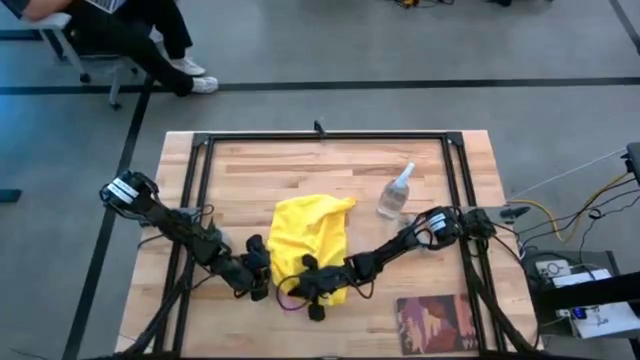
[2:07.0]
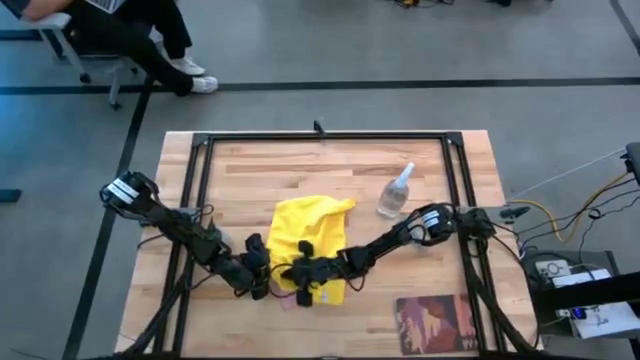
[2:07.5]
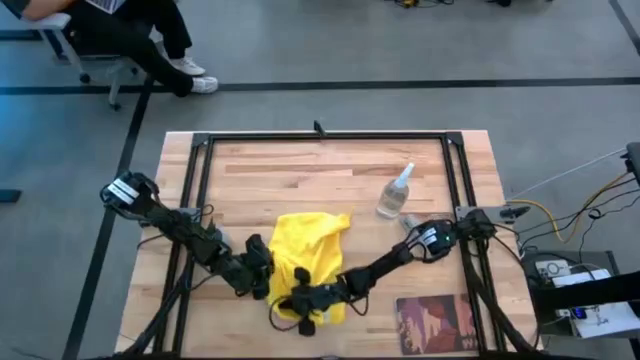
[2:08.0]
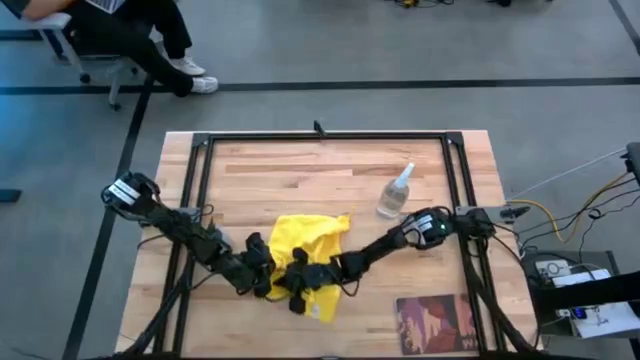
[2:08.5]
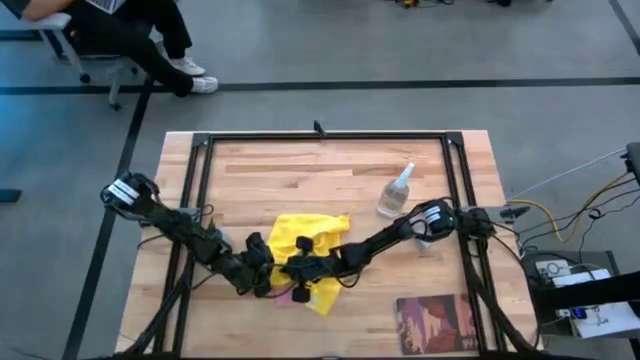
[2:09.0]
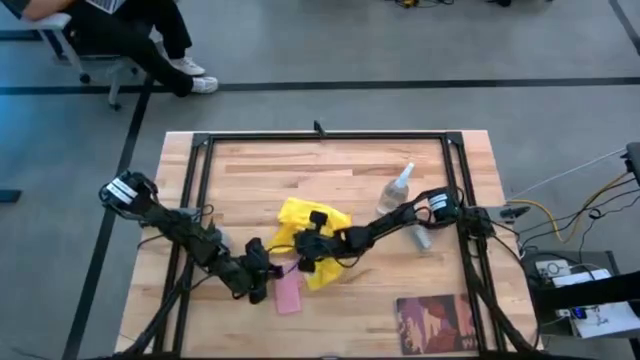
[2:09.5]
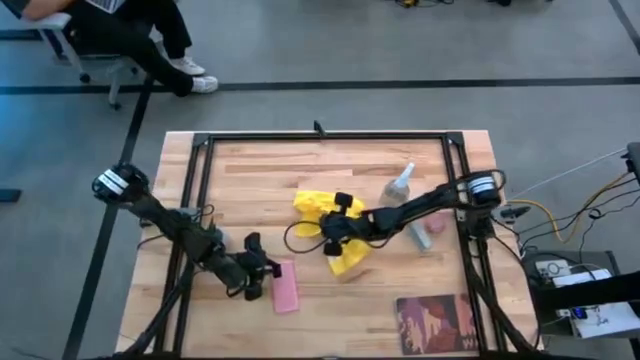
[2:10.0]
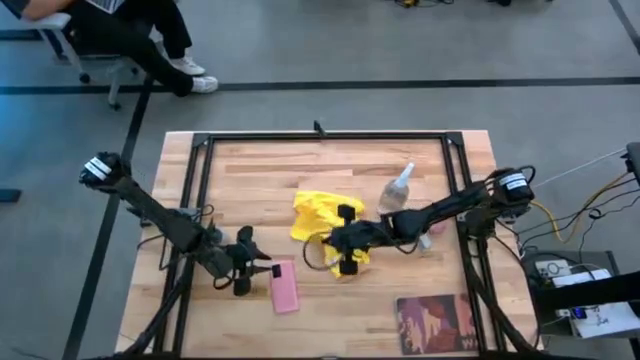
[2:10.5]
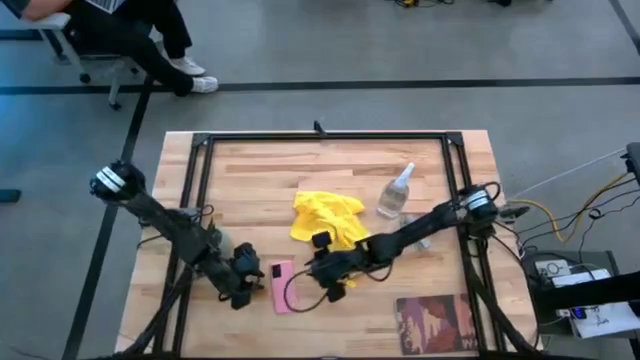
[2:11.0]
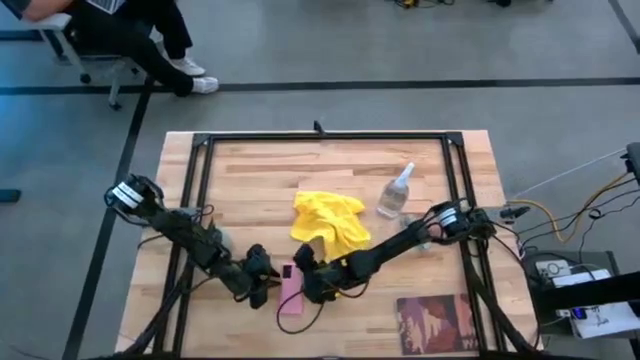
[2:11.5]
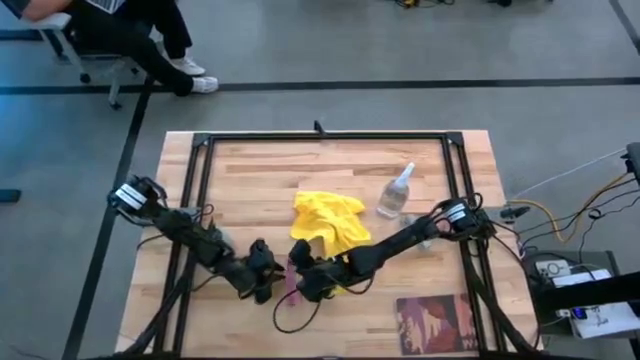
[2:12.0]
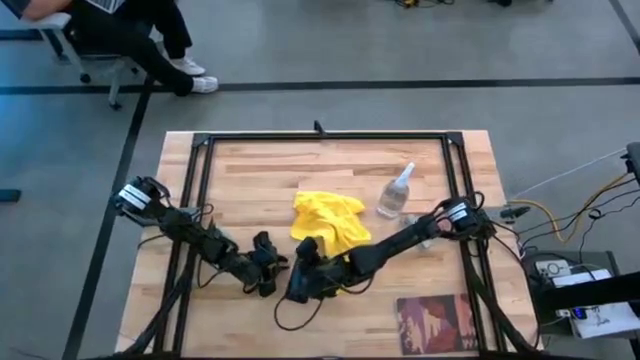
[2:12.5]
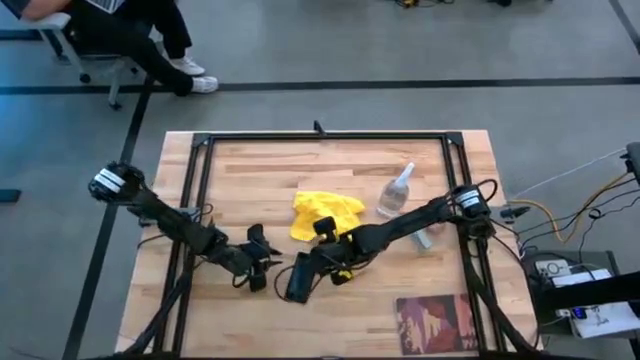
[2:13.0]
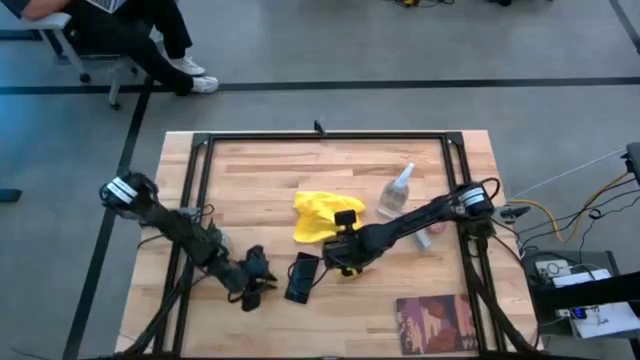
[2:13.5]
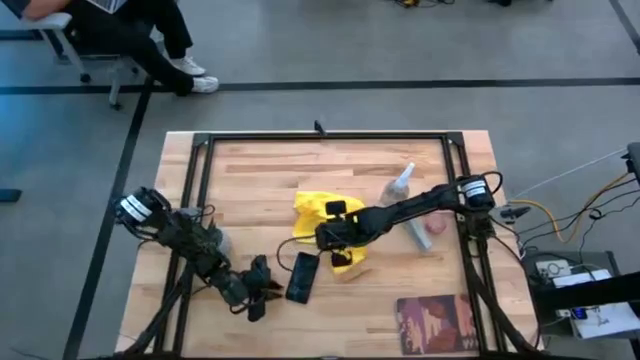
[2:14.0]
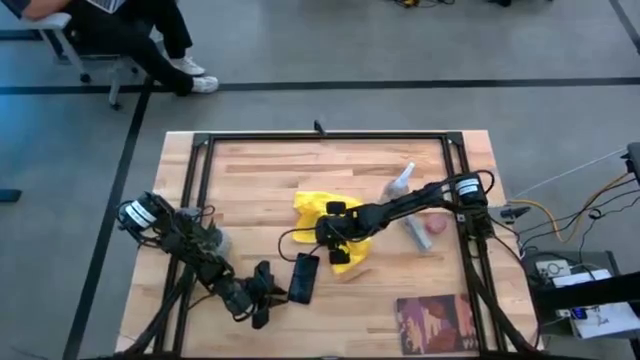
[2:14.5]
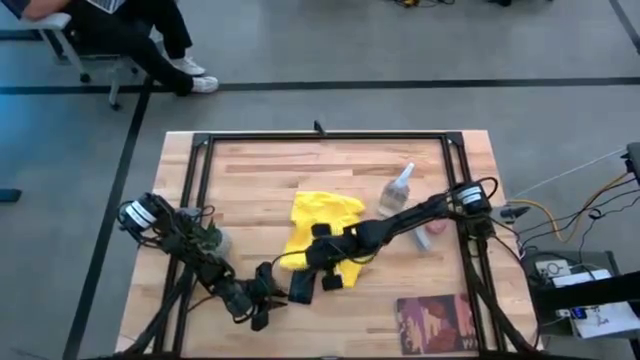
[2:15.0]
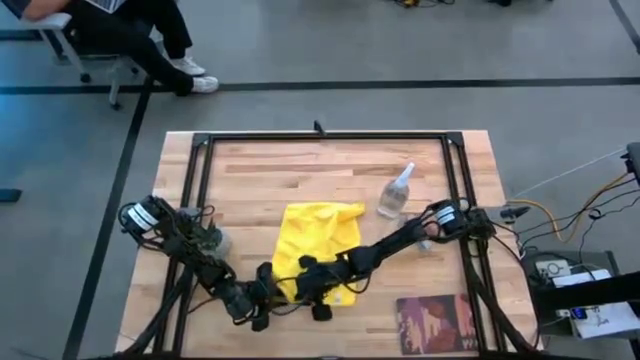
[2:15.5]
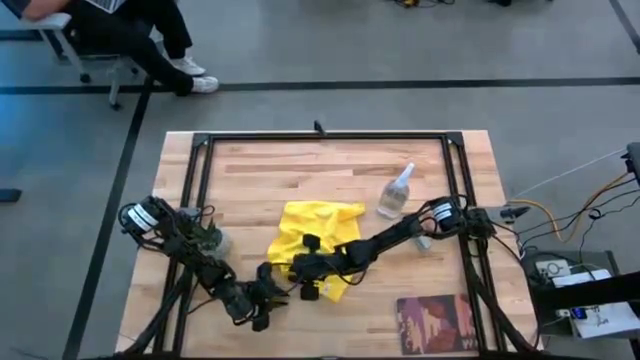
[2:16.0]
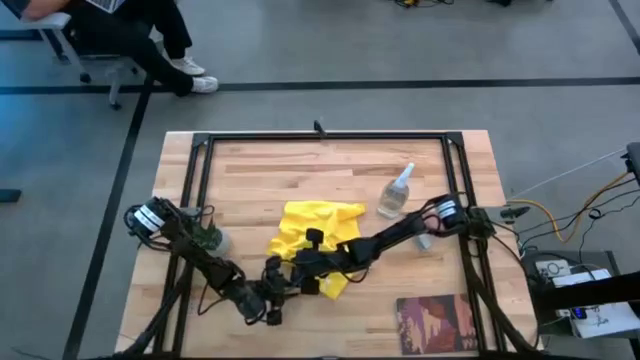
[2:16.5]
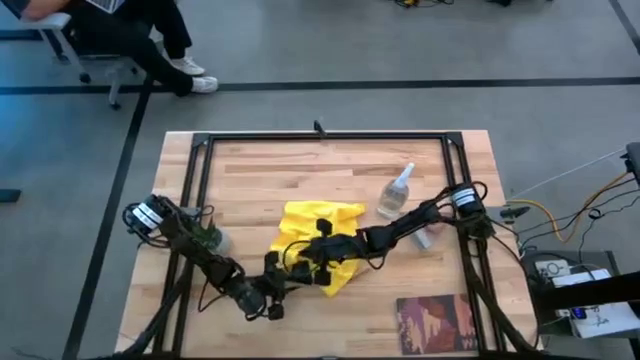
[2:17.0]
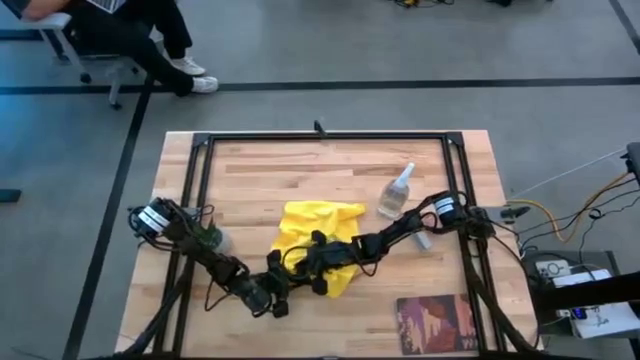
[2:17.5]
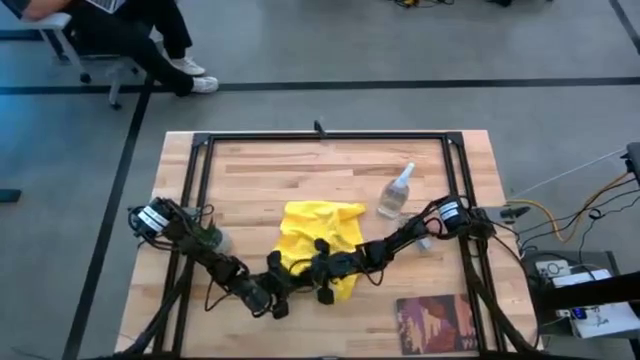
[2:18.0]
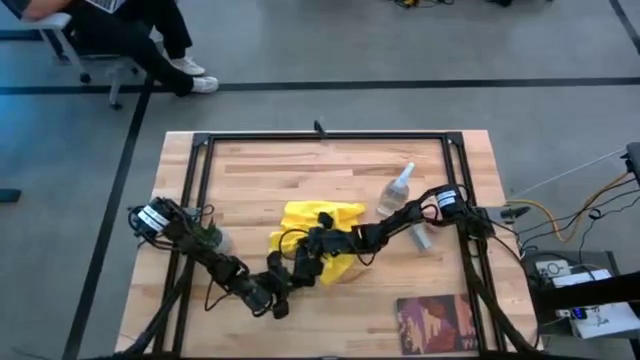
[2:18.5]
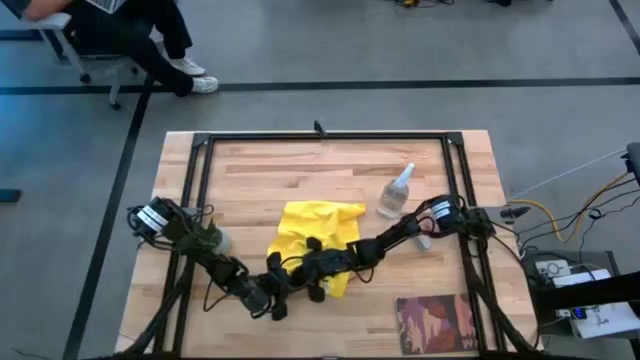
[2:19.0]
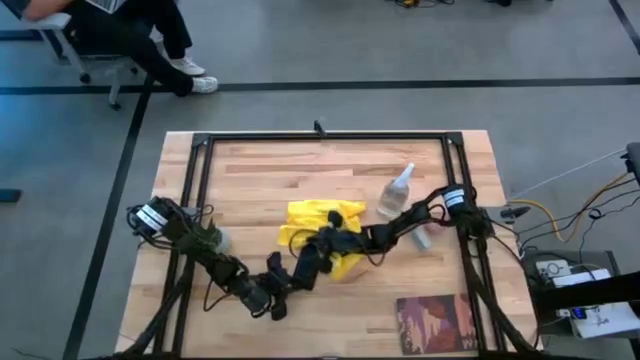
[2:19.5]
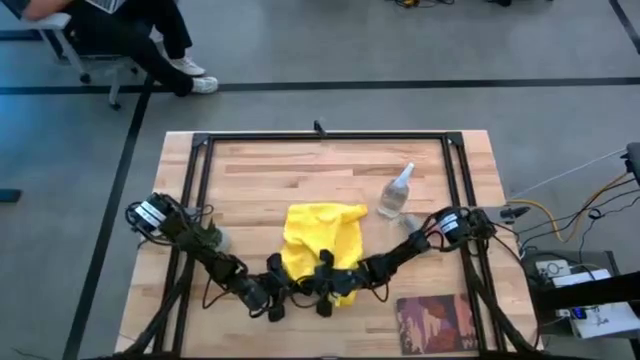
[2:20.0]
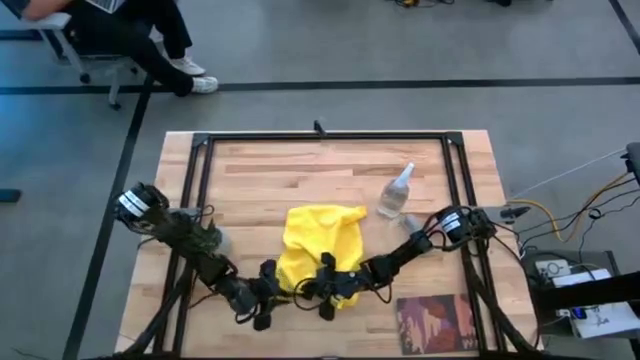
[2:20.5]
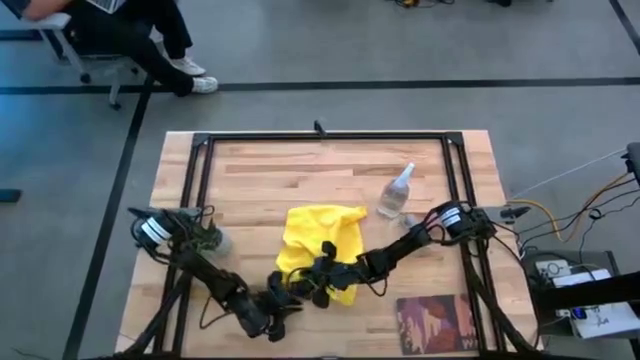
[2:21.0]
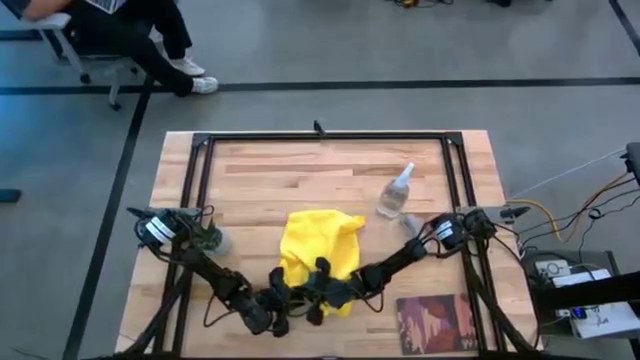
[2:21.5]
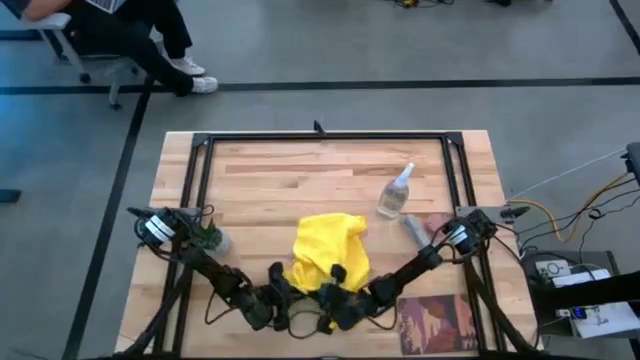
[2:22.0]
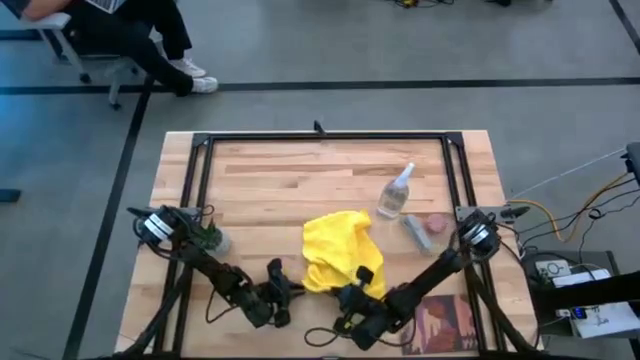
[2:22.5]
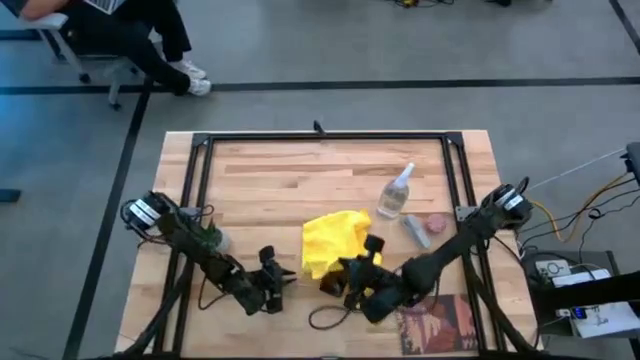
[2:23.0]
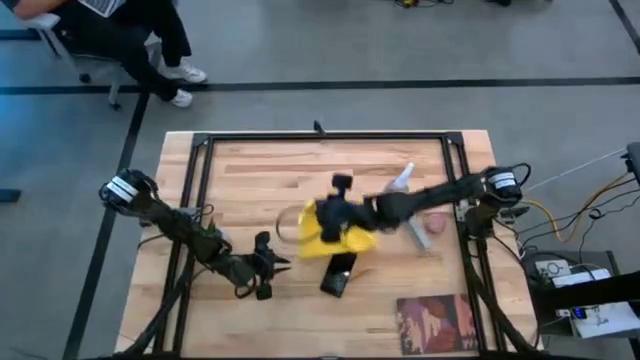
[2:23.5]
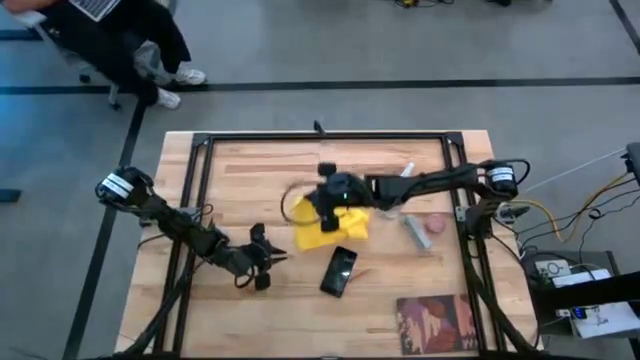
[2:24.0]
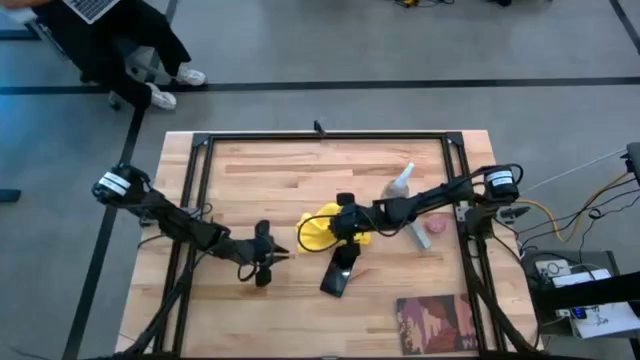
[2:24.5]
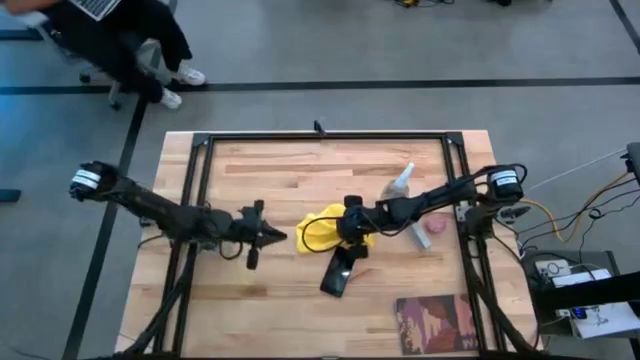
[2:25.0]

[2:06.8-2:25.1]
Task: Apply microfiber cloth
Wipe the front and back of the cellphone with the yellow microfiber cloth

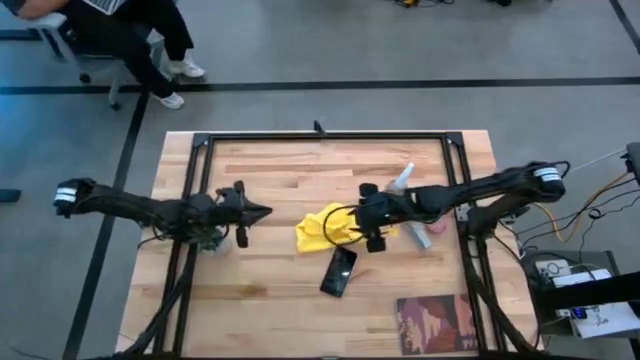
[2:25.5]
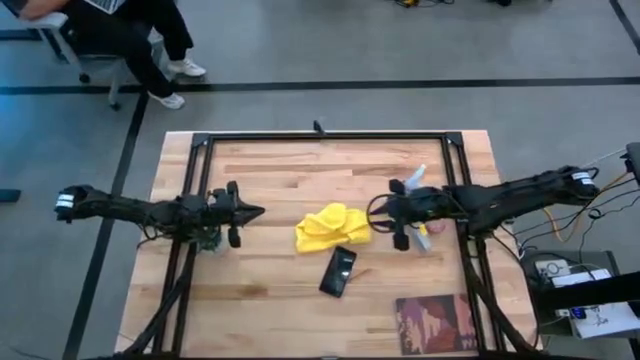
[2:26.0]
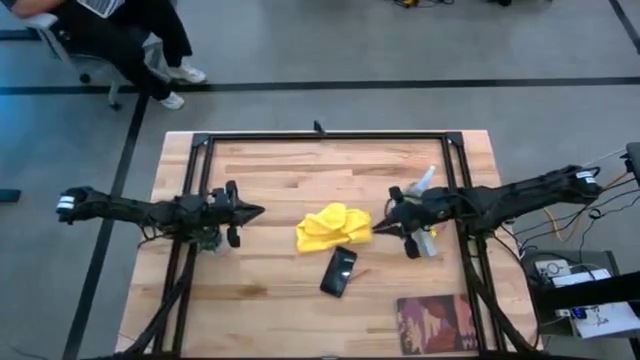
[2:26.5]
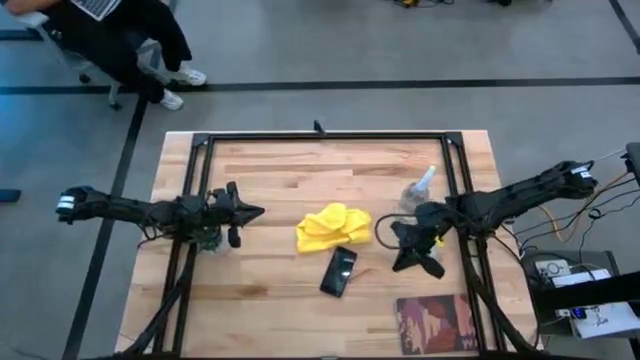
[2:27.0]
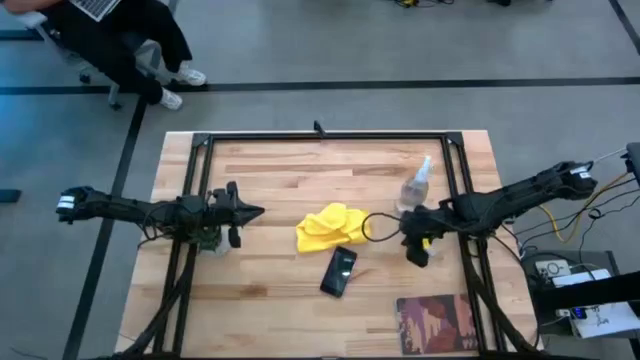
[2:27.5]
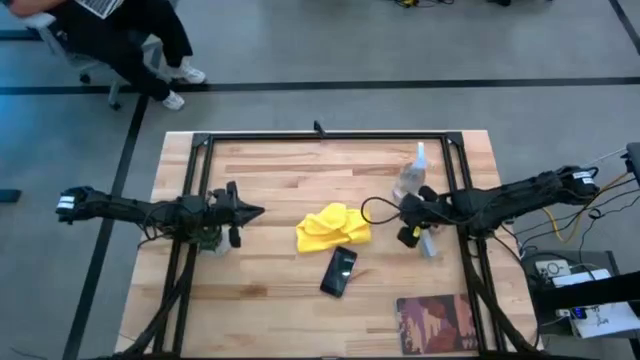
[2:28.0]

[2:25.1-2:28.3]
Adjust the spray bottle

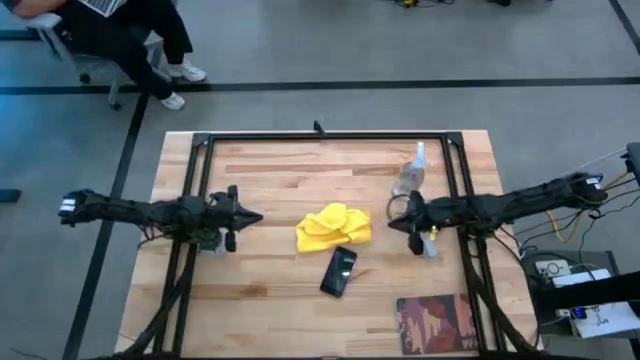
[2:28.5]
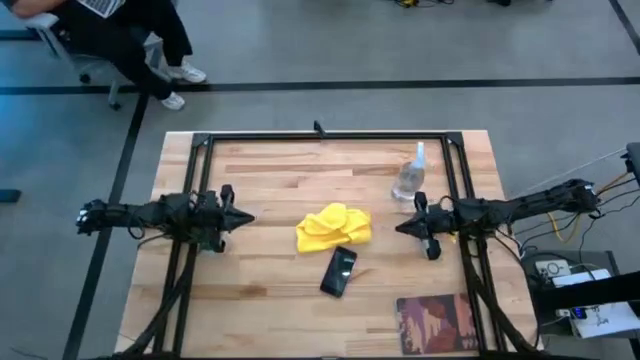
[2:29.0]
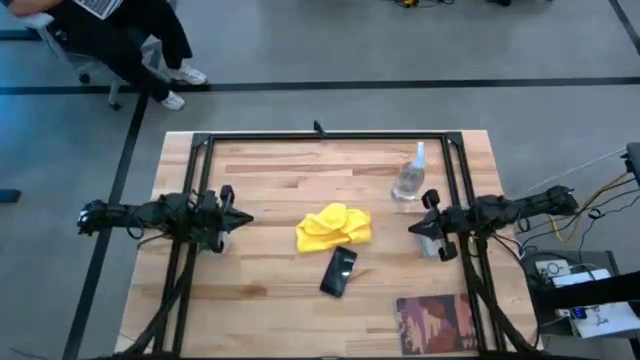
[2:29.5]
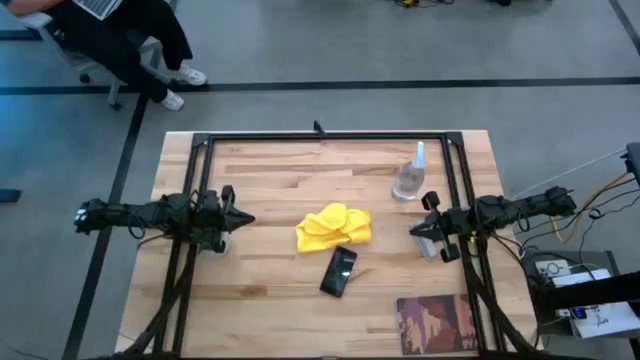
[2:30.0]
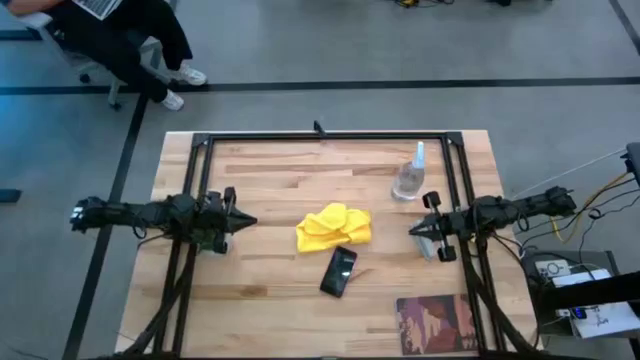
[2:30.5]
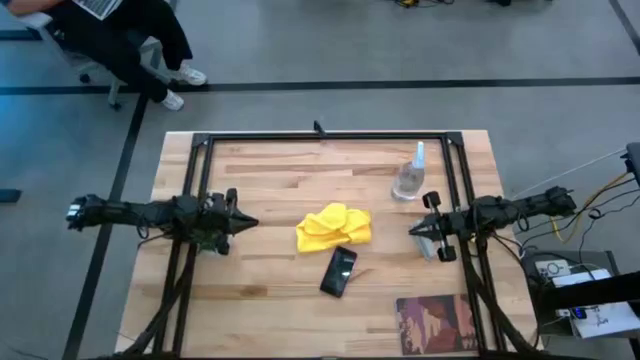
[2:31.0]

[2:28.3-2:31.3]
Return to Home Position
